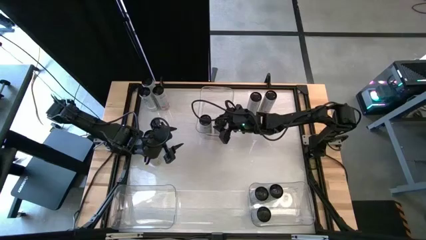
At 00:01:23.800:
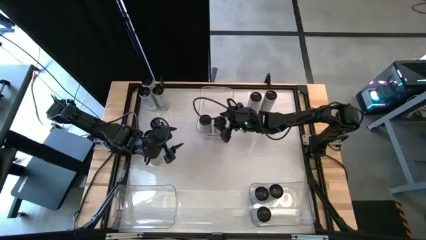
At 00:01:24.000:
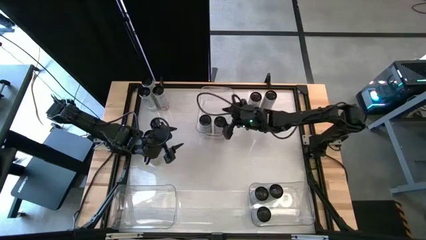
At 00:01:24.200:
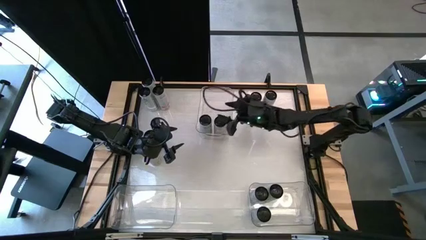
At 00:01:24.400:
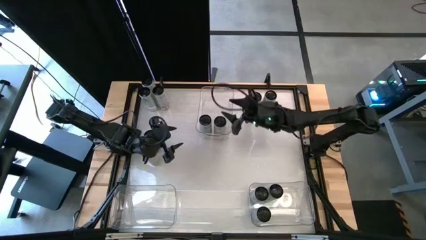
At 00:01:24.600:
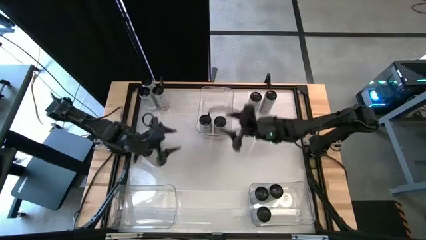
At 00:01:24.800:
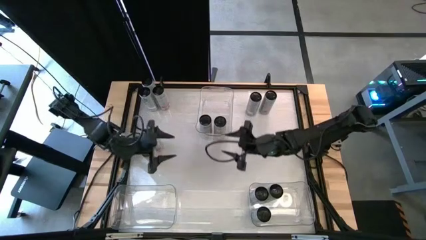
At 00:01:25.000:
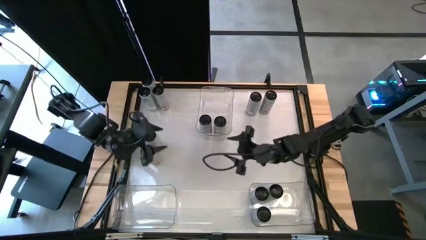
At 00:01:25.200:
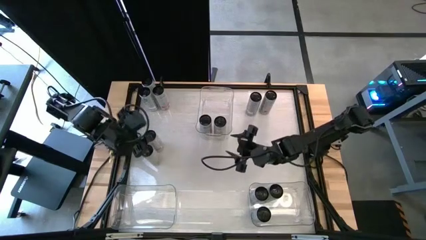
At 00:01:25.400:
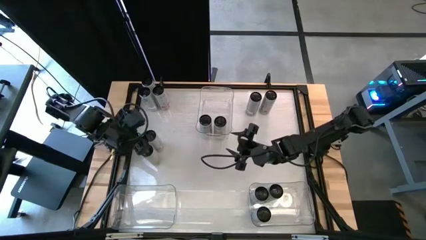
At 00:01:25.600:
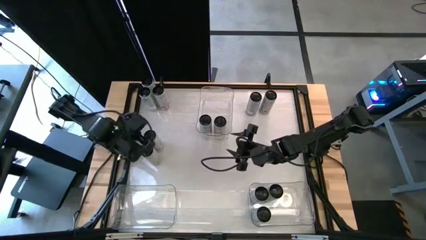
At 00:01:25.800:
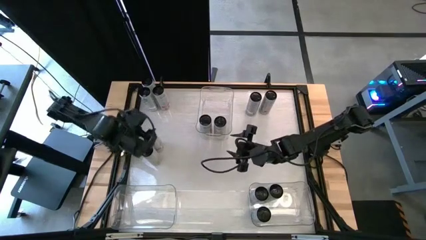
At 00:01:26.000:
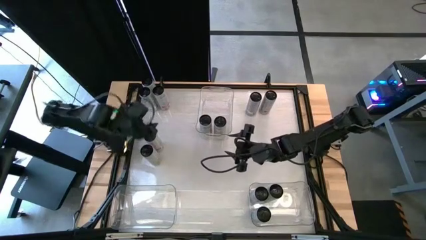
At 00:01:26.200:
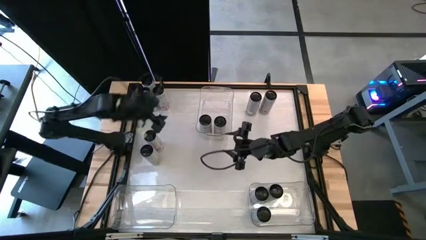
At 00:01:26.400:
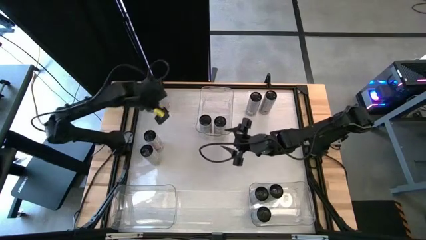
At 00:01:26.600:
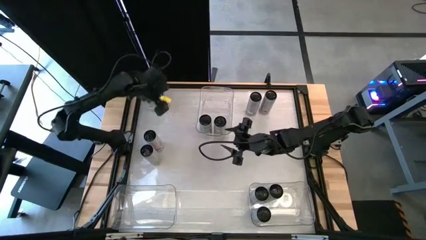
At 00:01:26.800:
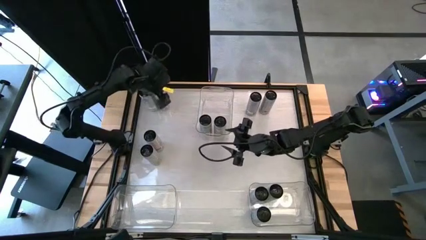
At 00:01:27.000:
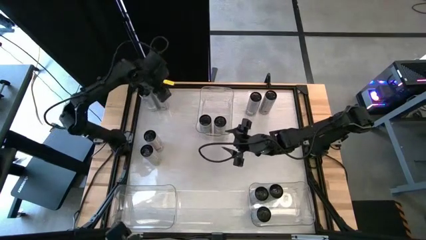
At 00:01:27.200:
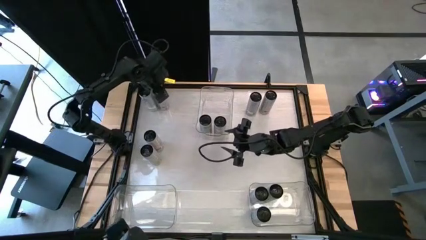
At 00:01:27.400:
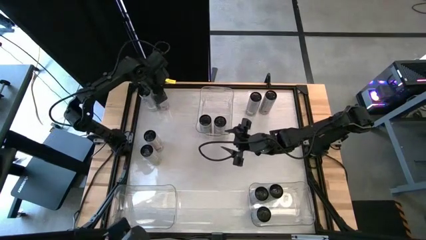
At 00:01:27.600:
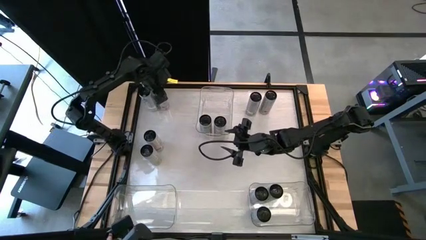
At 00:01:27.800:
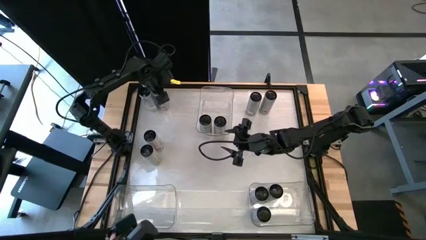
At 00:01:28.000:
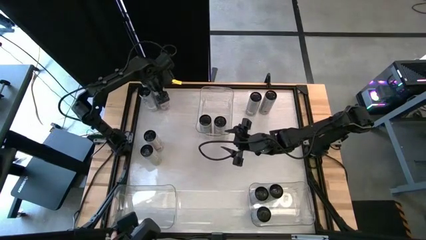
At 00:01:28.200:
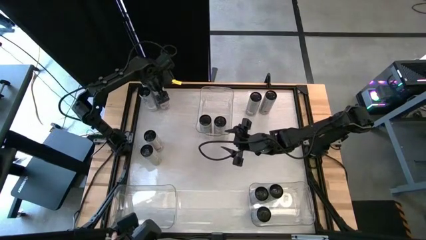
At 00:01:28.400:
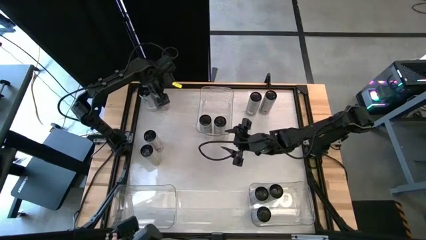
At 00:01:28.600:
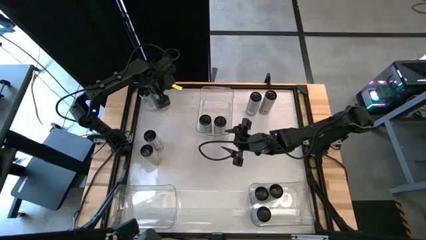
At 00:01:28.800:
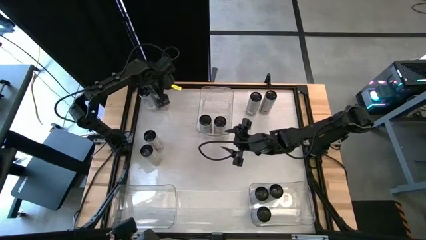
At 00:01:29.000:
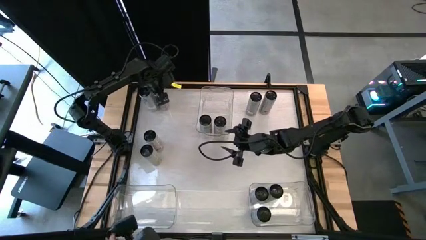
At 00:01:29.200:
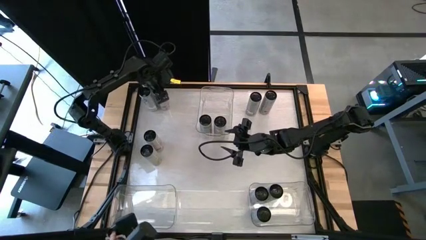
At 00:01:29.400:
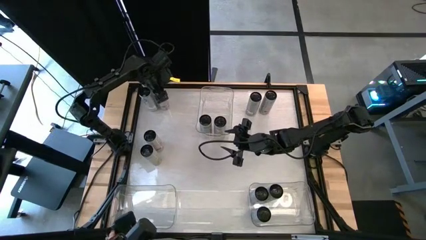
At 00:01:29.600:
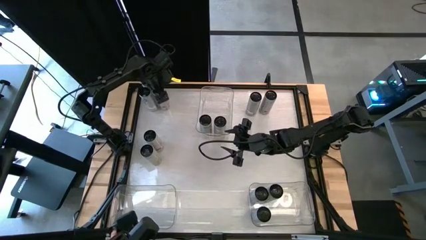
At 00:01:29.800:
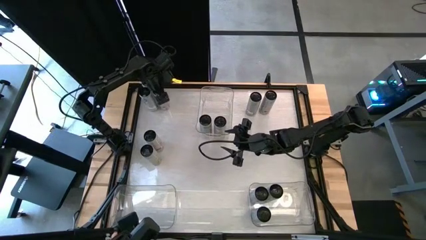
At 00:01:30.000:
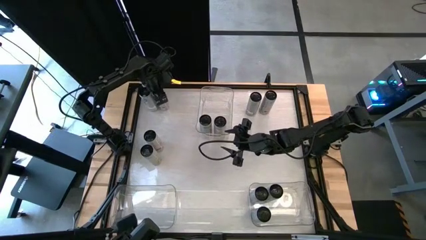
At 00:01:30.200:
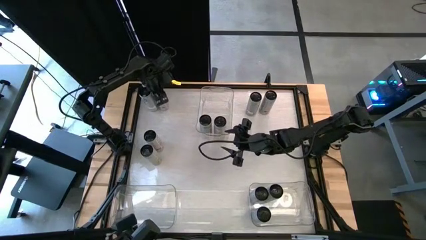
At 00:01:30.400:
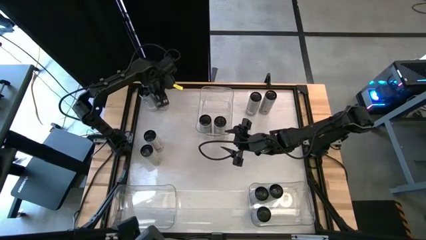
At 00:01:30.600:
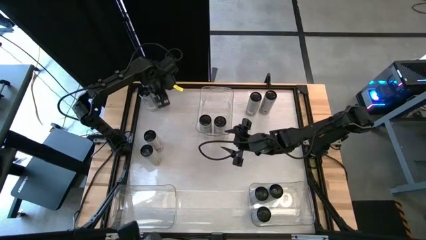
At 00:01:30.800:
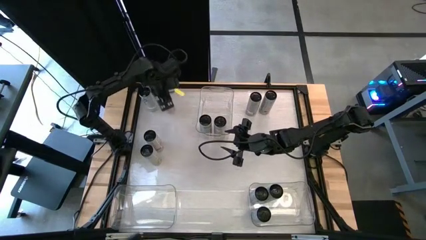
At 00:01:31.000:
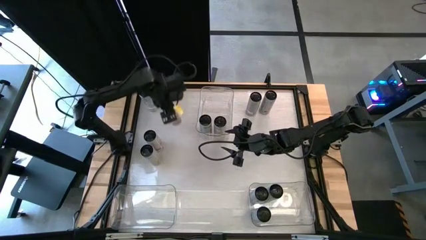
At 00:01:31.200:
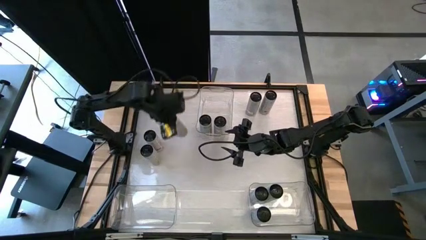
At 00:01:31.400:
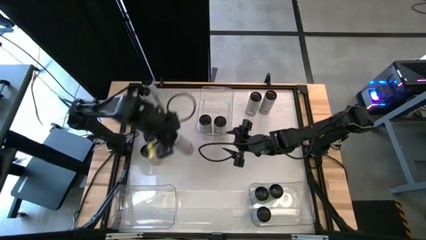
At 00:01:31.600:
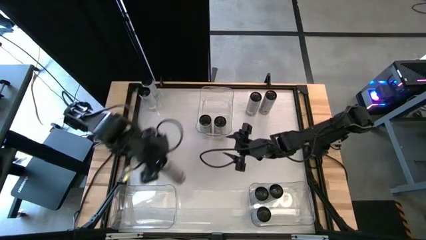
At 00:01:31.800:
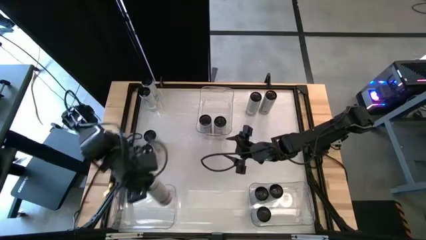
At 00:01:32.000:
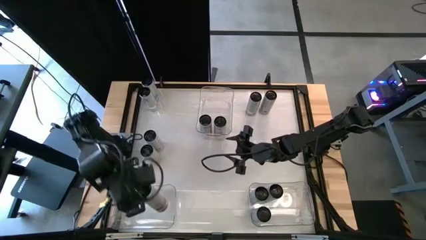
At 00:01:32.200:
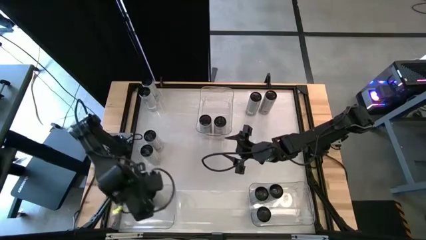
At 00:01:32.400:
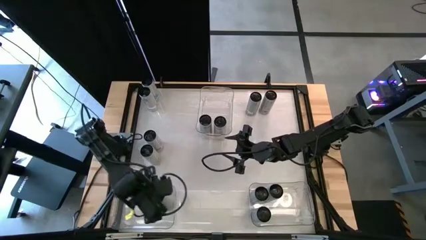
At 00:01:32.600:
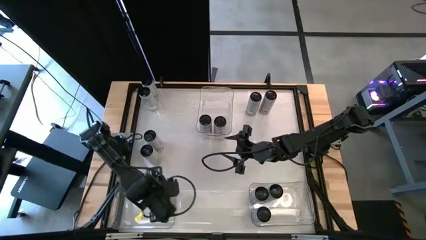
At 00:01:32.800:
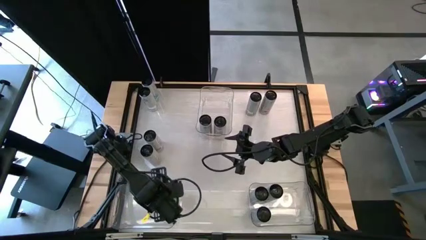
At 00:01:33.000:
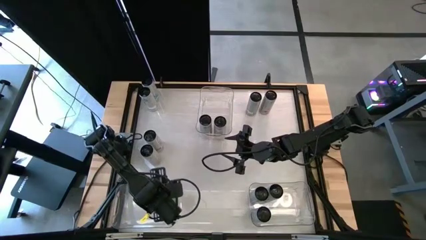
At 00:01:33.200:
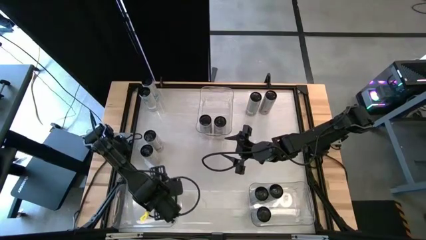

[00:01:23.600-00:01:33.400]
Task: Sort soda cans
Put the top left white pink soda can into the bottom left transparent bin

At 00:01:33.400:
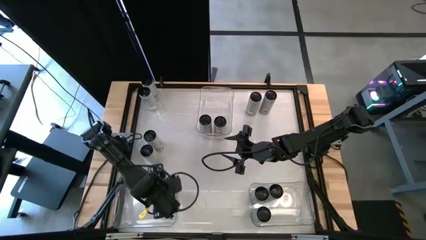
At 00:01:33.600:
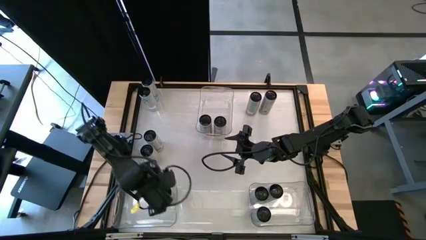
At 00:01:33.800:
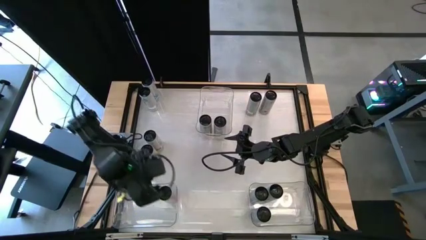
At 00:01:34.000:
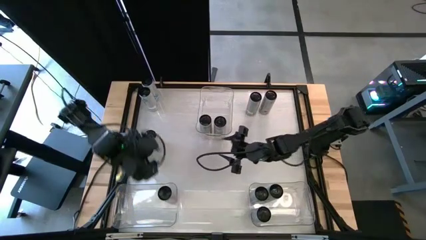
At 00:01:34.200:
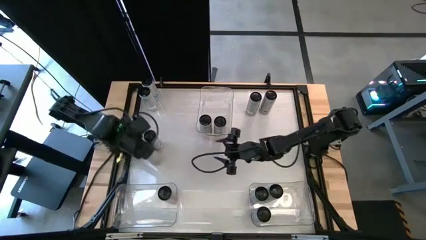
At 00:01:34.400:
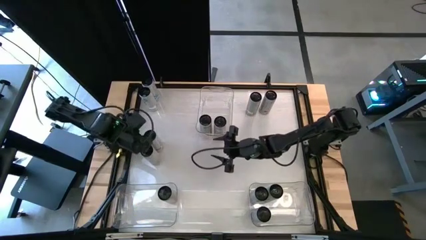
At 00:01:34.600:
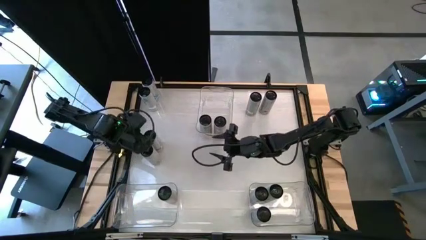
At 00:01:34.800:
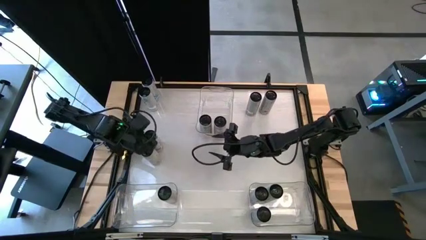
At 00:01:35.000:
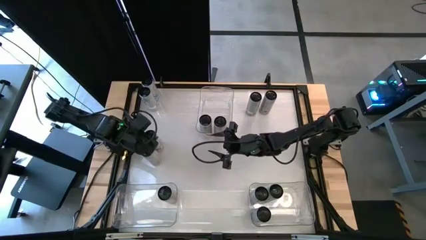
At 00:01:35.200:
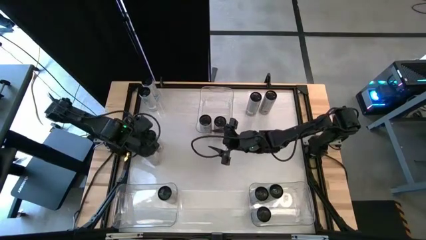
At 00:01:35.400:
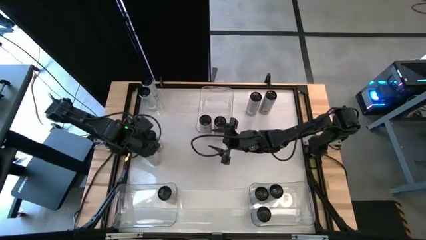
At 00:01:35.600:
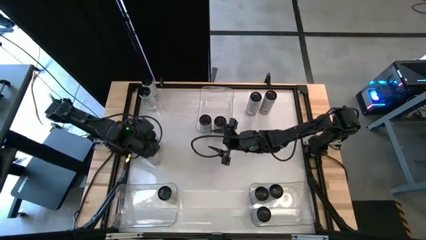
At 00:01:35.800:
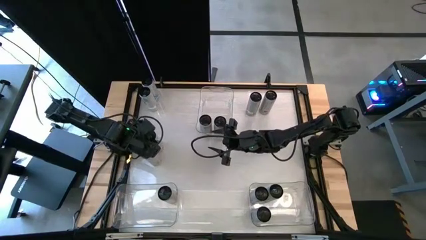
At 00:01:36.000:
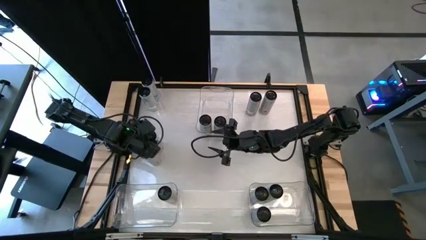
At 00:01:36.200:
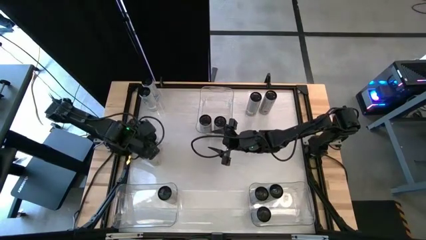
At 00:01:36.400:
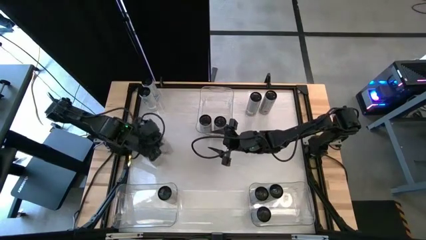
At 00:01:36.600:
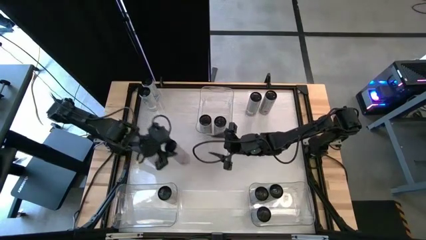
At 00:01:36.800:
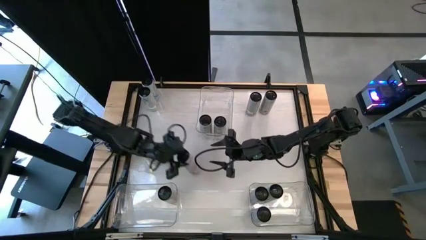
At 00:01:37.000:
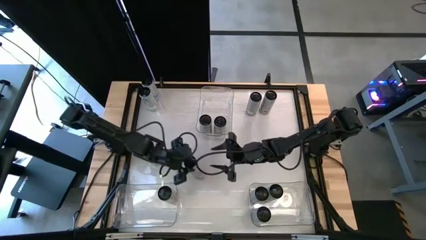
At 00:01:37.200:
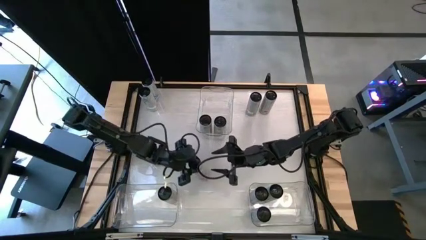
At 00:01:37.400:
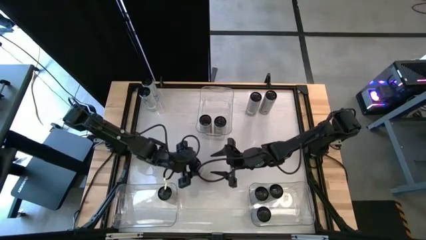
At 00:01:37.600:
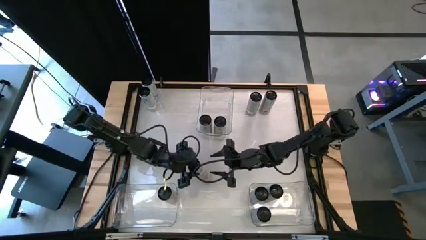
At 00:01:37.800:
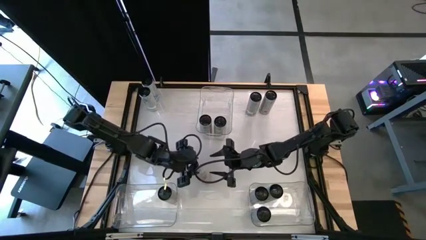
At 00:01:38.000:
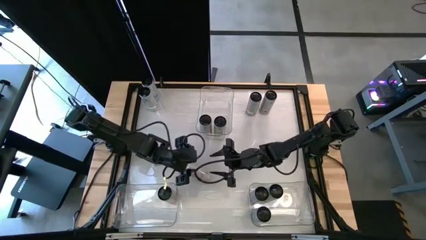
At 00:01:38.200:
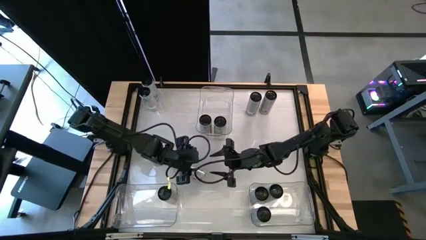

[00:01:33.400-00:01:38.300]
Put the bottom white pink soda can into the bottom left transparent bin
